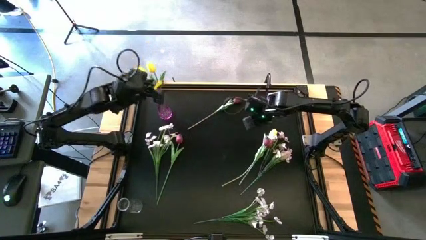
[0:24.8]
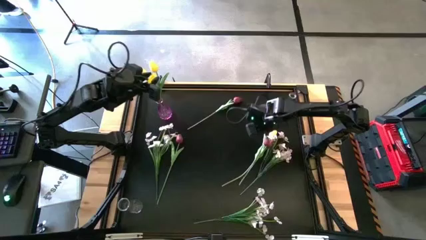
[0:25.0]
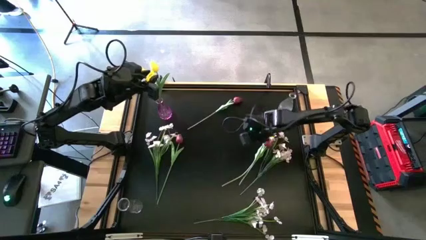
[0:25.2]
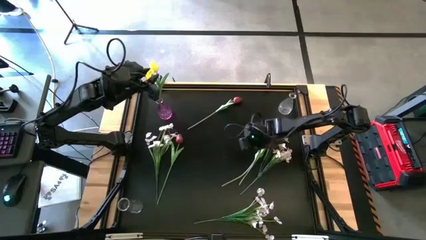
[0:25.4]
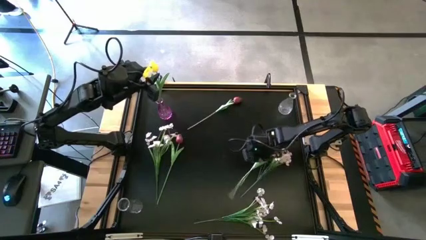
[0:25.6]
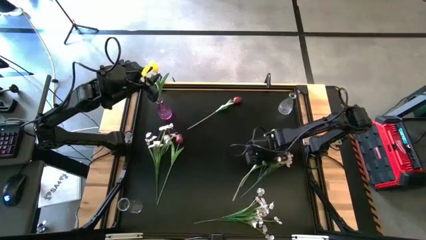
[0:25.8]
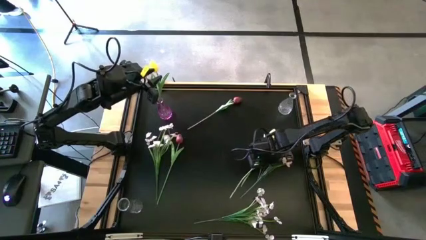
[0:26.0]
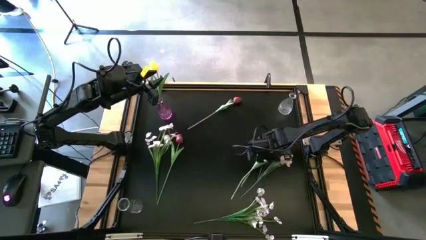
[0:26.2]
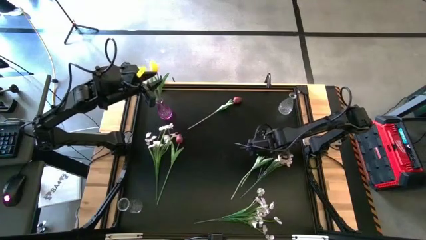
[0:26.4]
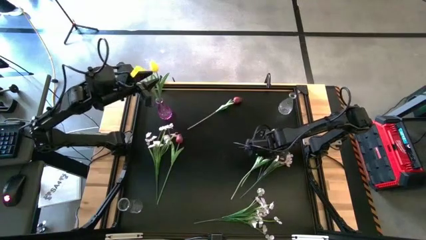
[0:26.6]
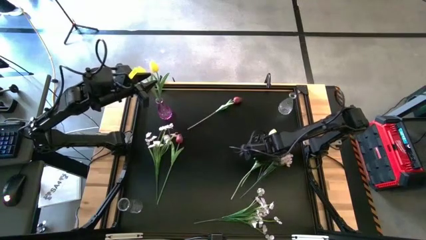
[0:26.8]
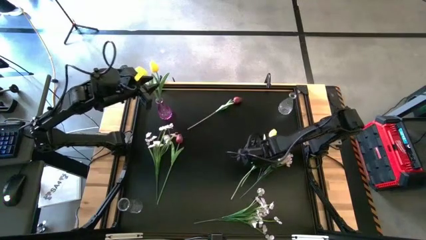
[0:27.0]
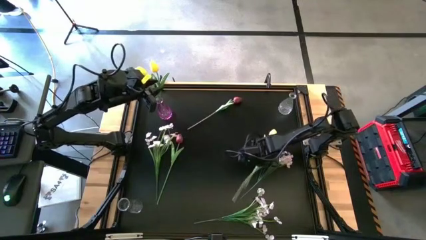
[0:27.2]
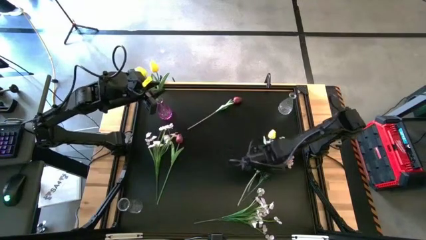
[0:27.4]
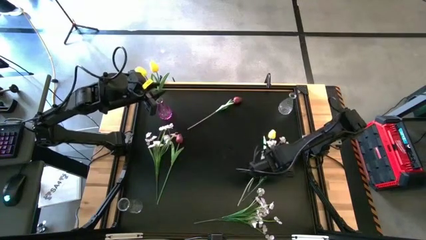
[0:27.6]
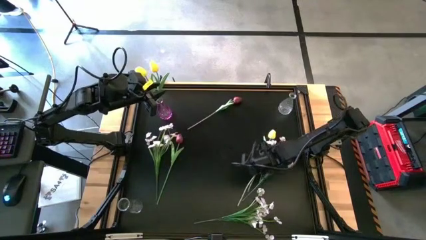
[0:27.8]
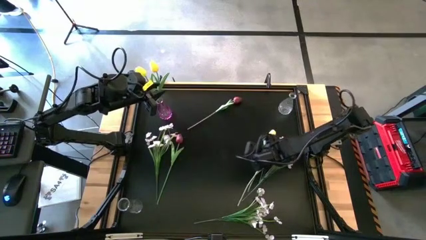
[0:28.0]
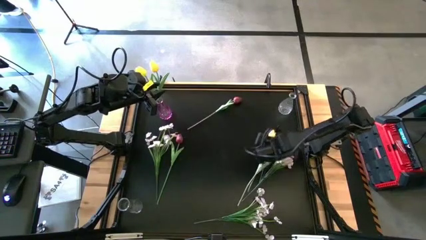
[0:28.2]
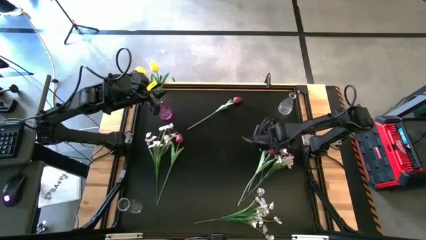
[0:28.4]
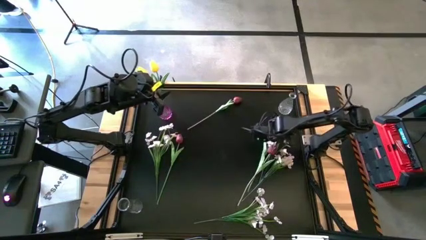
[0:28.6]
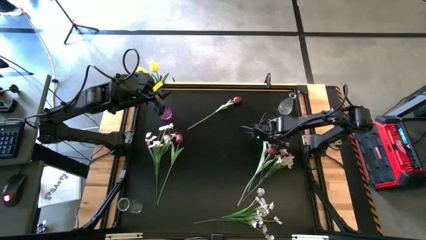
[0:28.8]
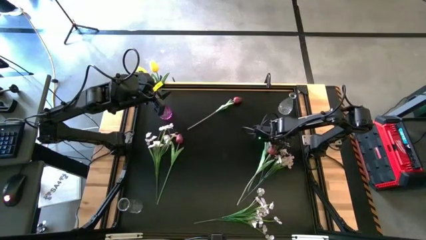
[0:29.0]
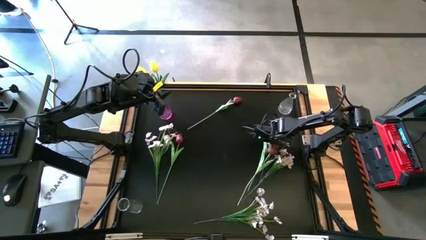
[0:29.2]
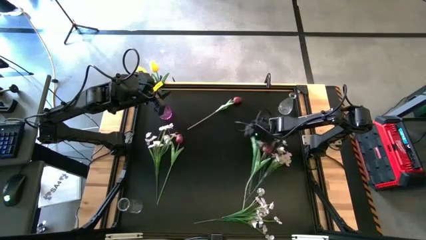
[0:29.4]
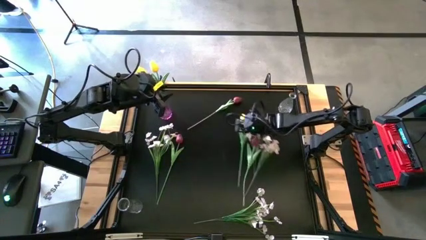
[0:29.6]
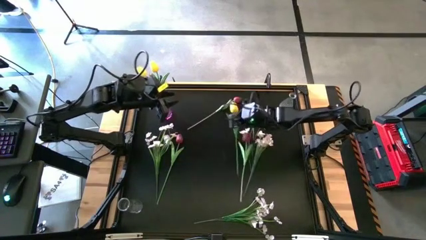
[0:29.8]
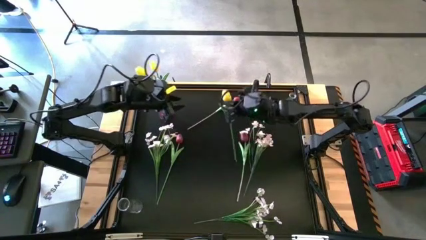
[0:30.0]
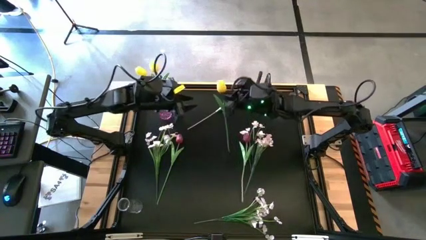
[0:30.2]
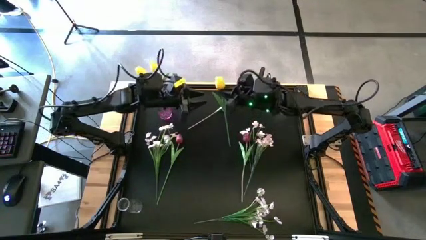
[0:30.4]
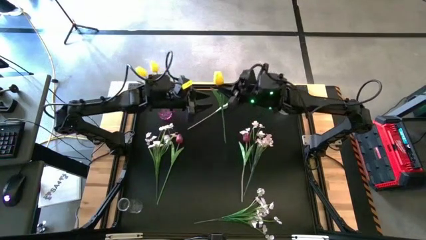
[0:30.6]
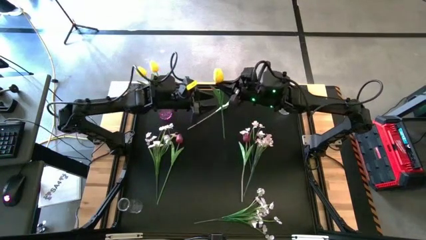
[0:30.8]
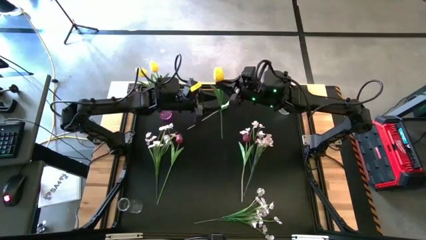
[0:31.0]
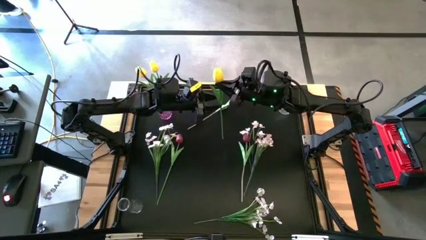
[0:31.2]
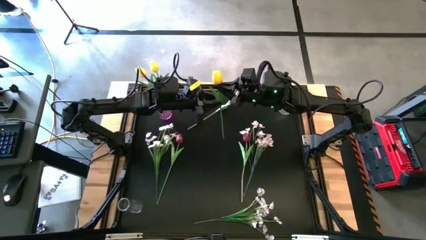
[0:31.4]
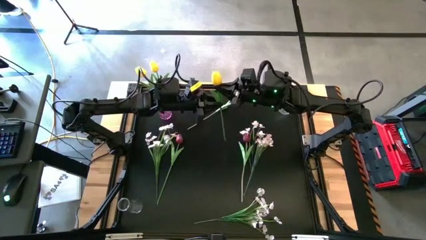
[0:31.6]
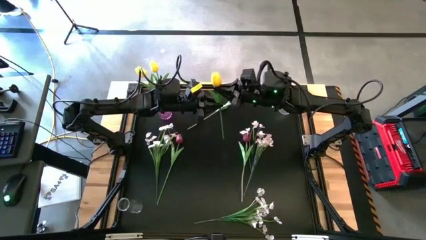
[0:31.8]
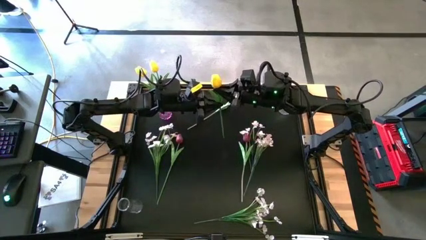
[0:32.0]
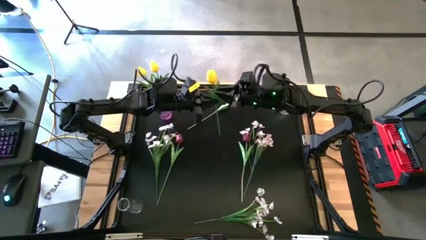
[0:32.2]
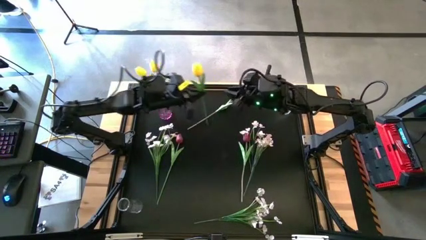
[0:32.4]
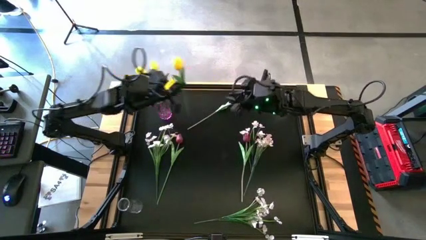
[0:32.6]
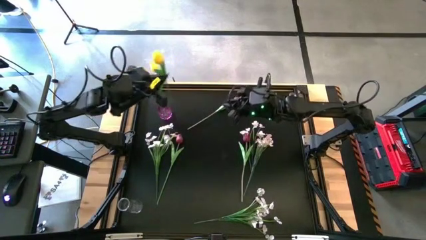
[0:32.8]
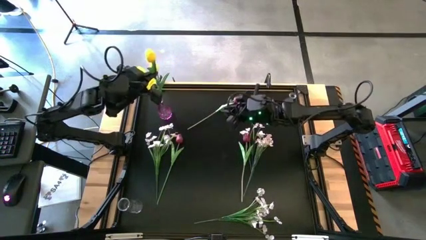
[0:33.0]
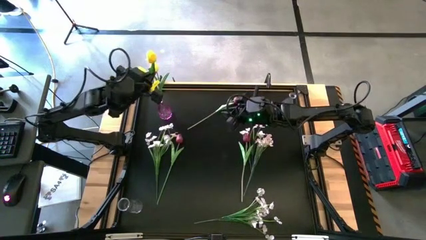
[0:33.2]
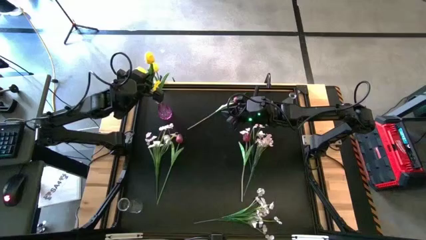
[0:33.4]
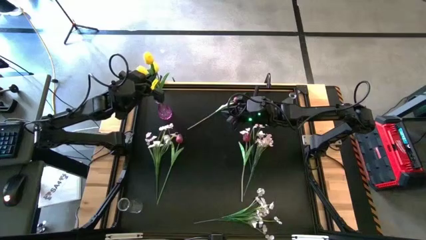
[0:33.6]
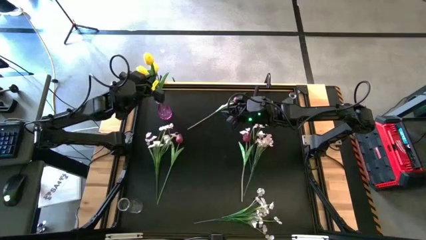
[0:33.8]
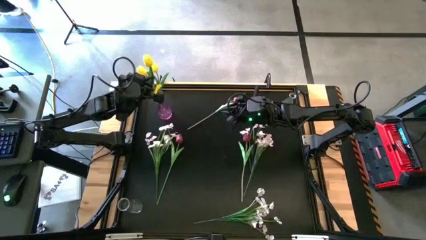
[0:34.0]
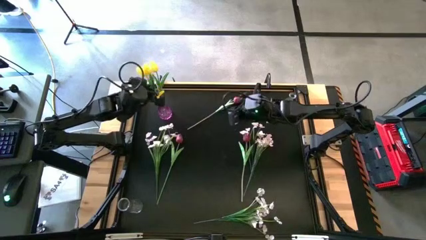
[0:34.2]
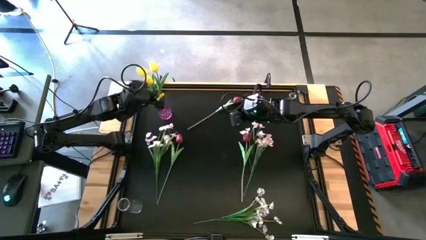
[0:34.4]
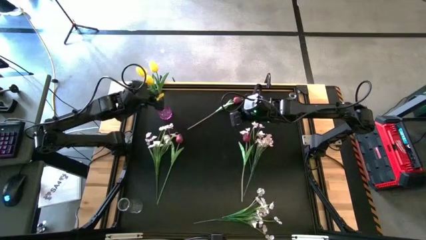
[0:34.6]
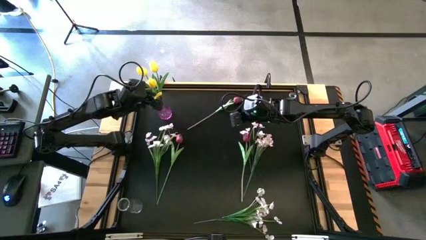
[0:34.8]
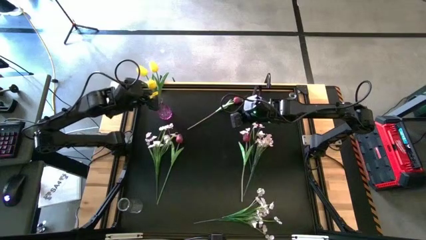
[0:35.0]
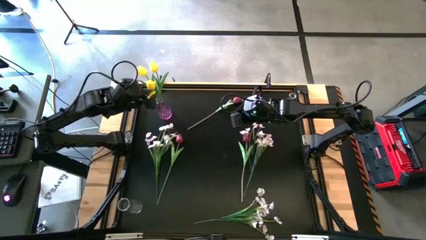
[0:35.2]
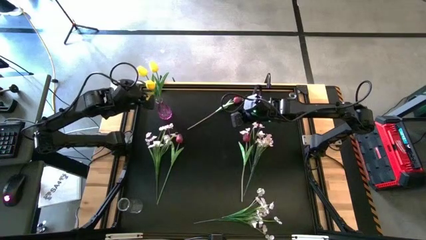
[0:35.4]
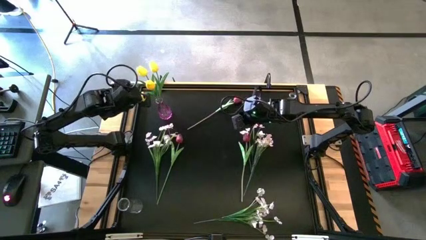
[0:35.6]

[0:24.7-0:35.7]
Task: Sort flowers into vase by color
Put the yellow flower into the violet vase

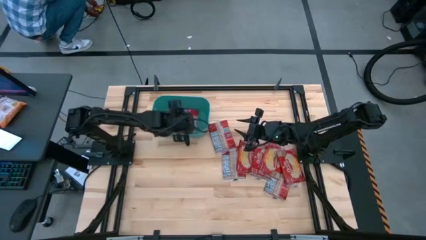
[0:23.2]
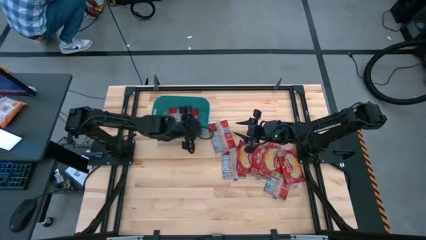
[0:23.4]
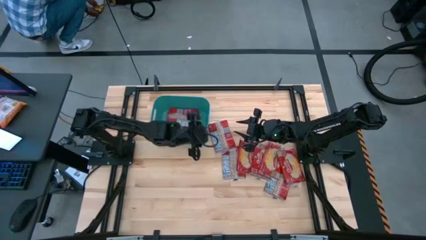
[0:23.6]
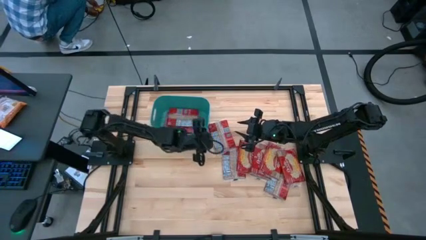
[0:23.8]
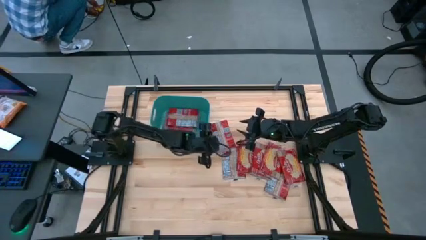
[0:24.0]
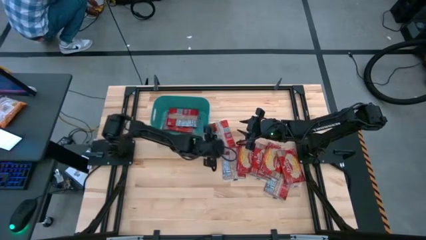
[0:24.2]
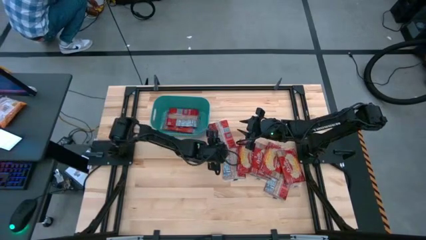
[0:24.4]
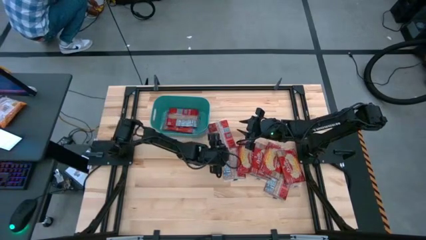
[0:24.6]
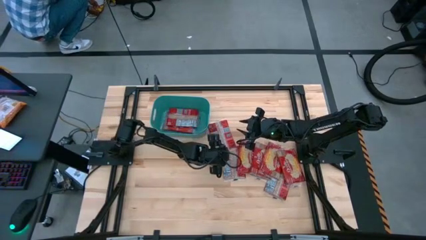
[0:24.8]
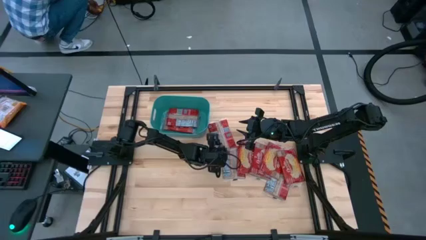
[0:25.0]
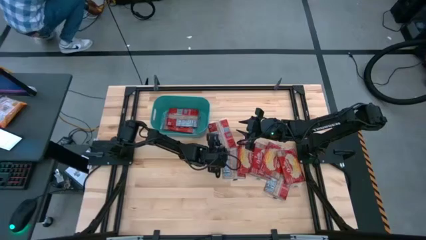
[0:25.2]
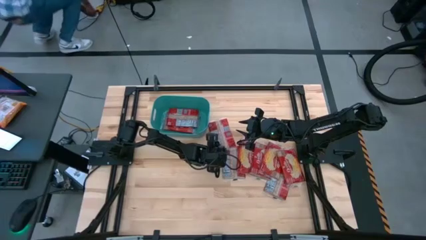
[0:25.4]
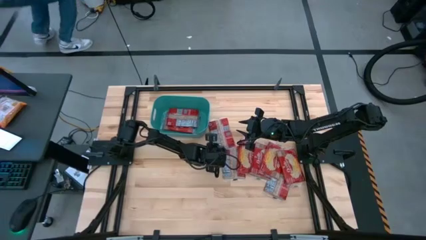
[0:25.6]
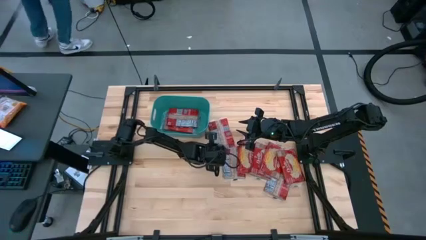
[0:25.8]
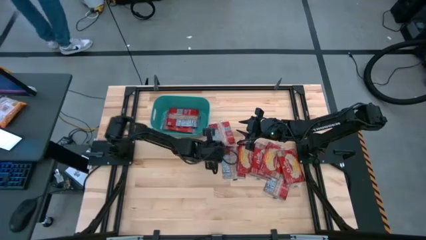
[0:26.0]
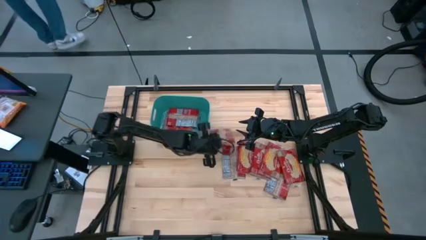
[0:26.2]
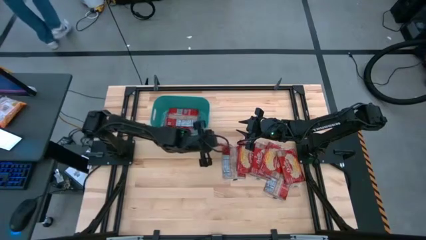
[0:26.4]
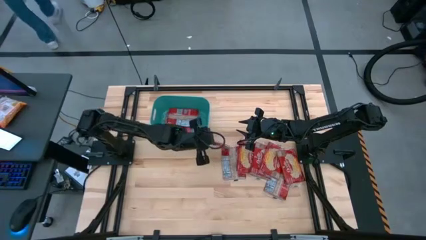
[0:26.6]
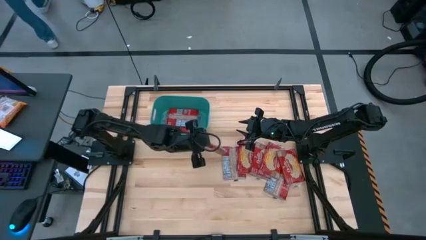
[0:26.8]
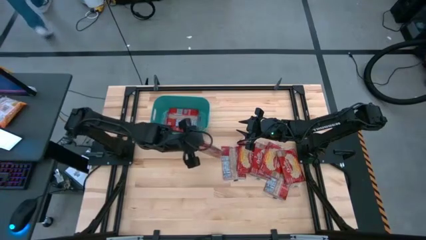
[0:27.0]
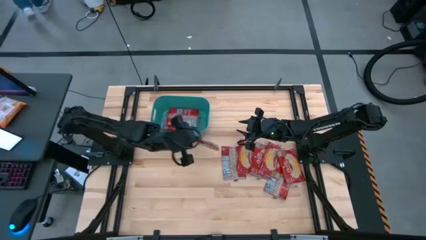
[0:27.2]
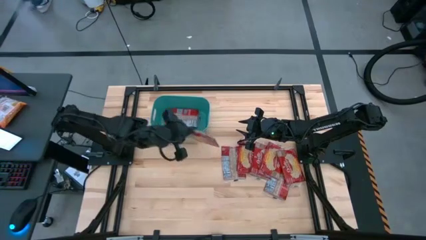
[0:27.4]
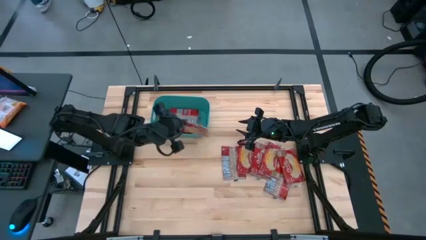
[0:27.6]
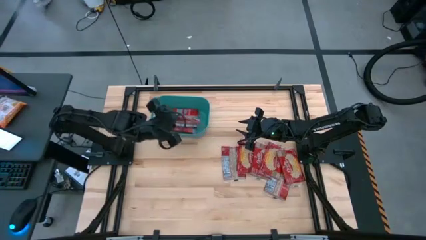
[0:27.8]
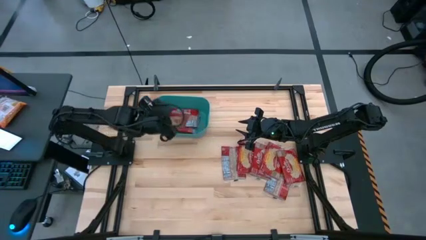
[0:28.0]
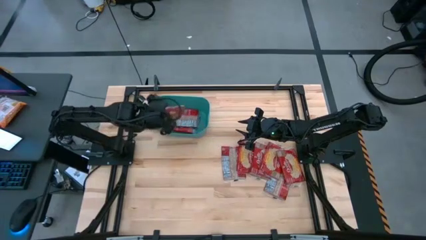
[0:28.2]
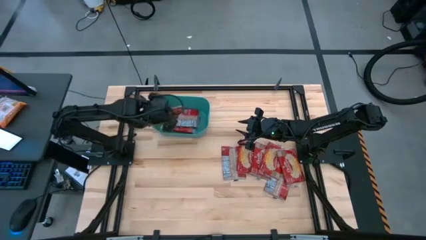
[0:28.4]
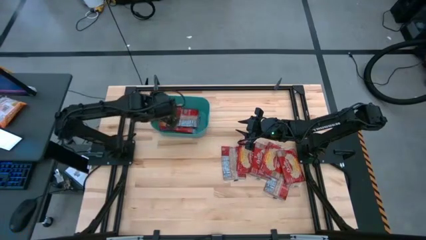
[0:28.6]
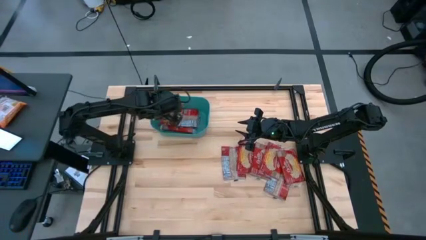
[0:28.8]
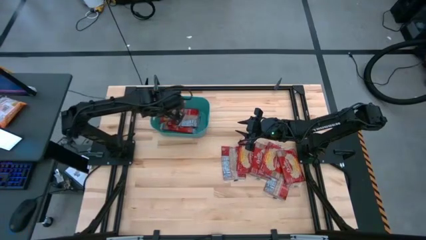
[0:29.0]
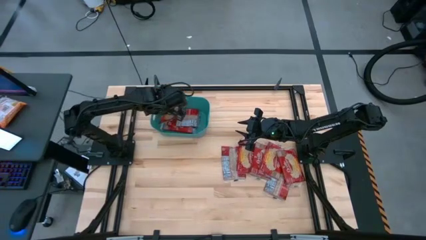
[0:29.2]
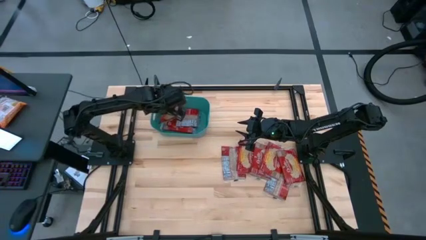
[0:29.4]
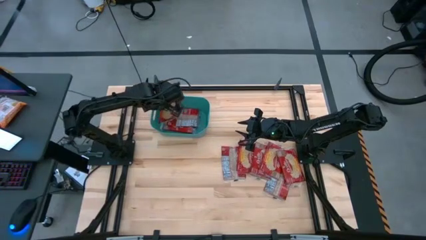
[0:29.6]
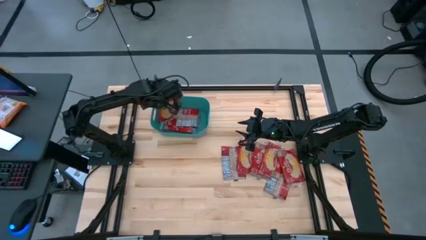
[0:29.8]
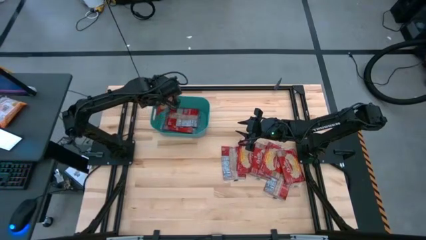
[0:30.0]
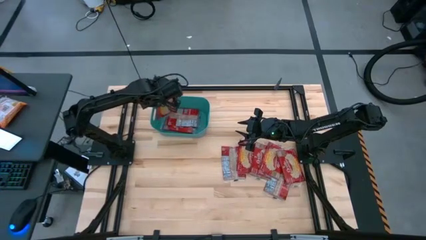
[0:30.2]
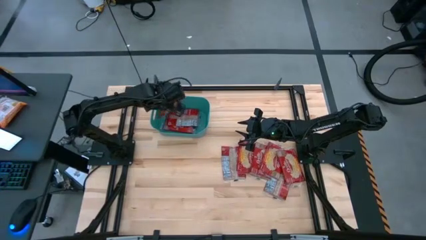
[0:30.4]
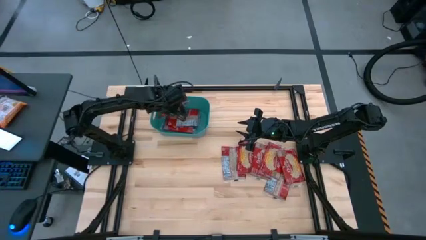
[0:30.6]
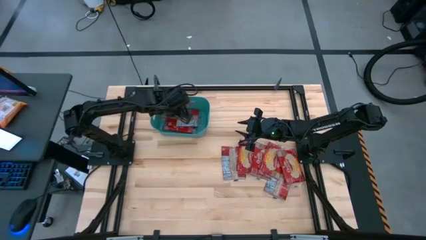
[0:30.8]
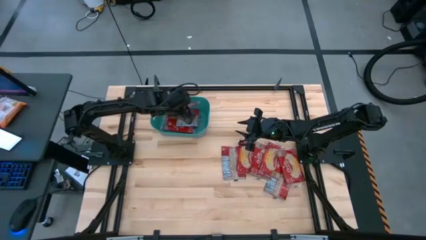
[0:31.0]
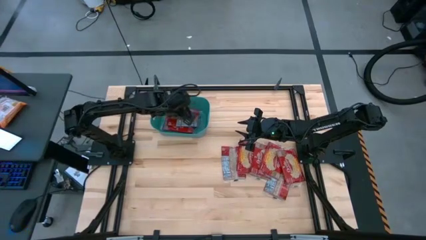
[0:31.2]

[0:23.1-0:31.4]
Task: Sort popcorn bags into baskets
Put the red popcorn pack into the green bin
